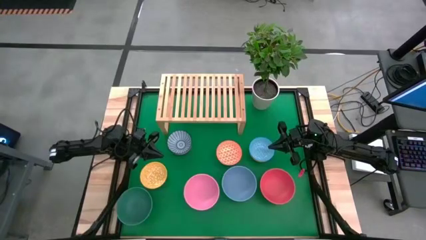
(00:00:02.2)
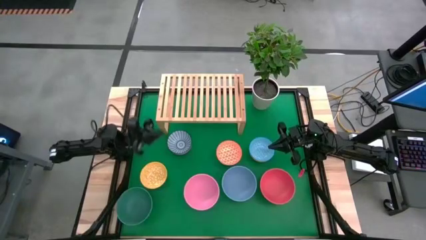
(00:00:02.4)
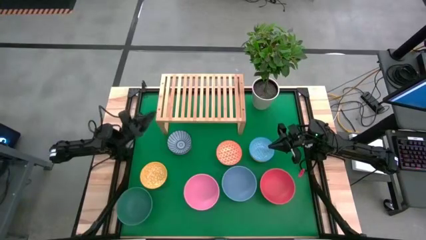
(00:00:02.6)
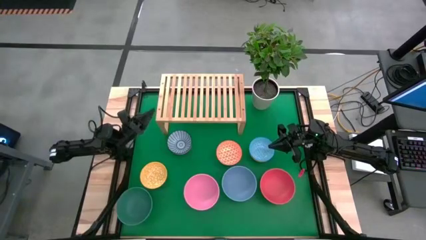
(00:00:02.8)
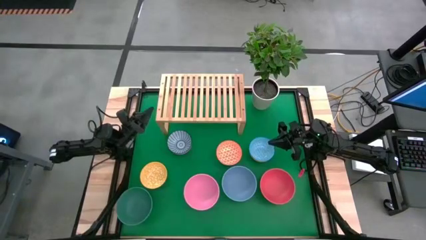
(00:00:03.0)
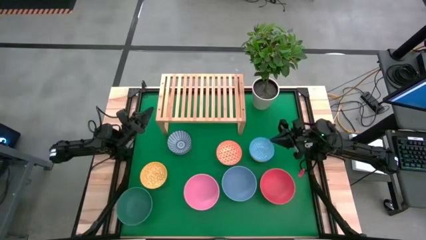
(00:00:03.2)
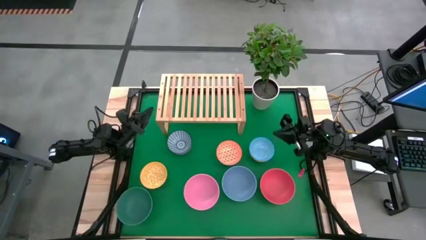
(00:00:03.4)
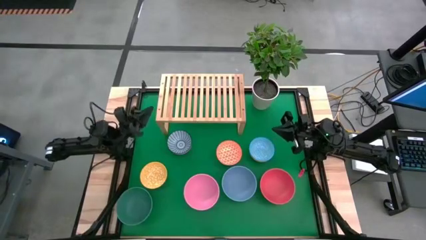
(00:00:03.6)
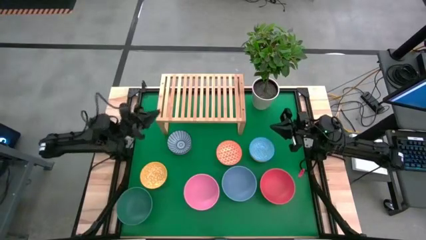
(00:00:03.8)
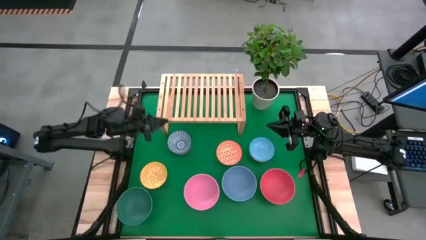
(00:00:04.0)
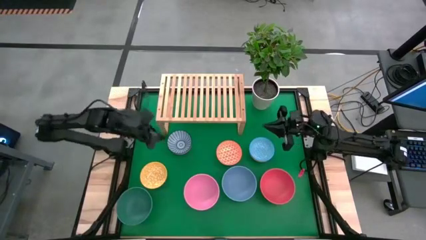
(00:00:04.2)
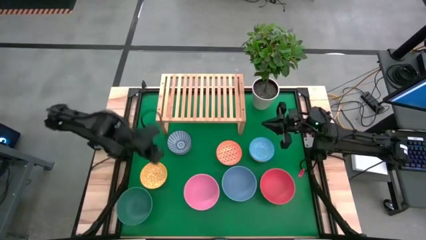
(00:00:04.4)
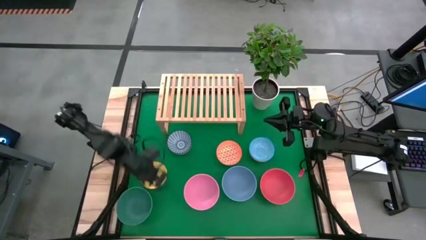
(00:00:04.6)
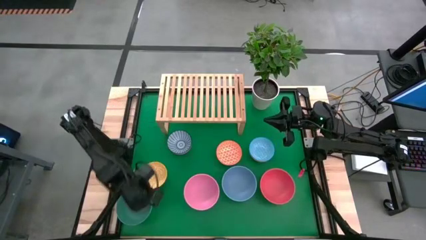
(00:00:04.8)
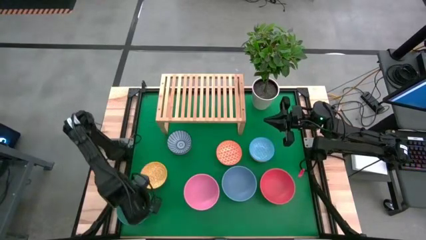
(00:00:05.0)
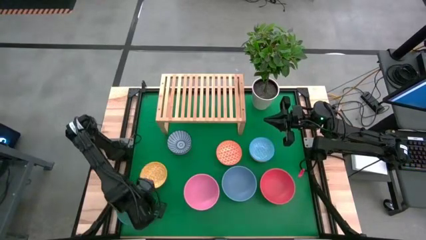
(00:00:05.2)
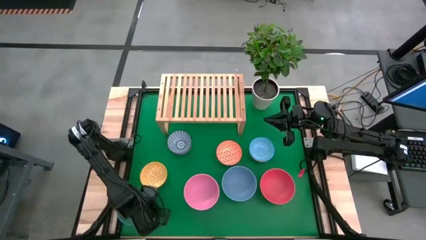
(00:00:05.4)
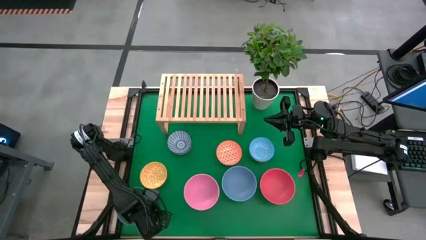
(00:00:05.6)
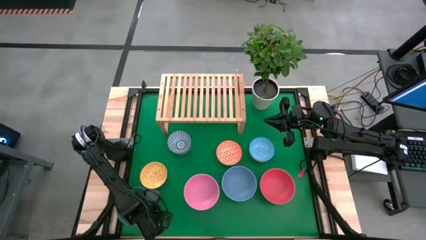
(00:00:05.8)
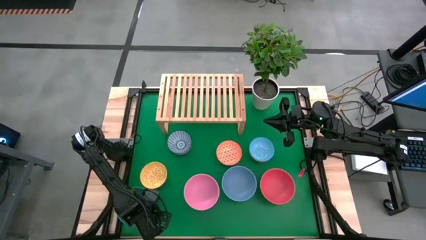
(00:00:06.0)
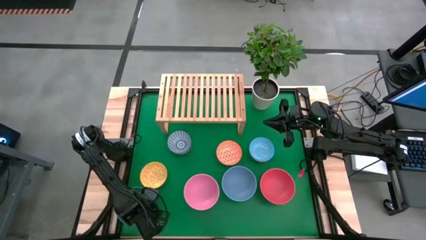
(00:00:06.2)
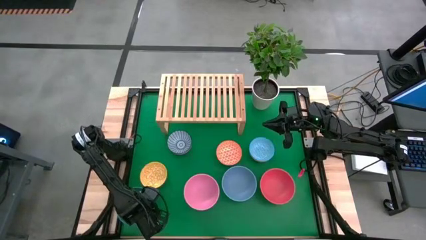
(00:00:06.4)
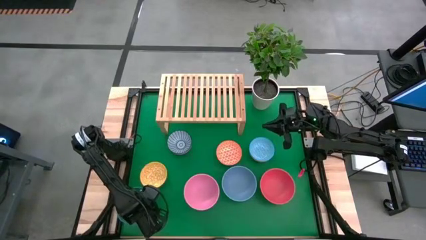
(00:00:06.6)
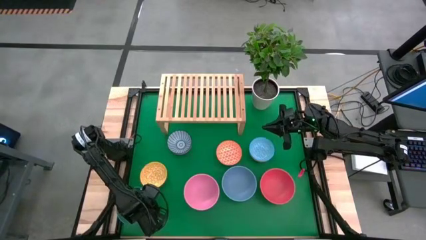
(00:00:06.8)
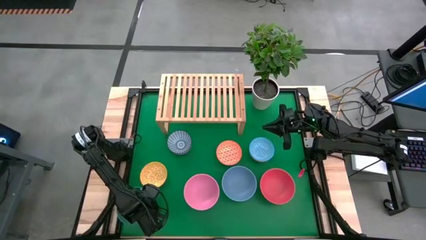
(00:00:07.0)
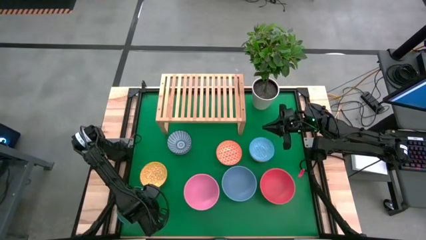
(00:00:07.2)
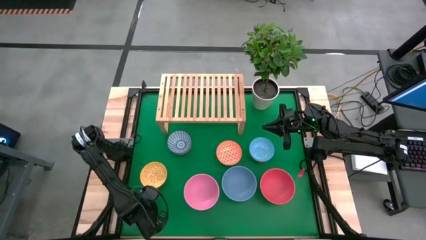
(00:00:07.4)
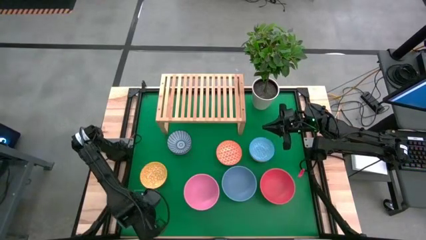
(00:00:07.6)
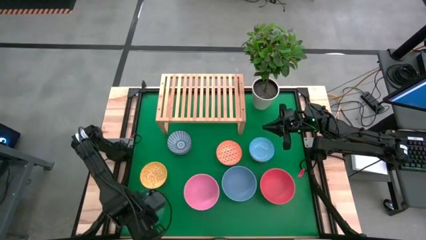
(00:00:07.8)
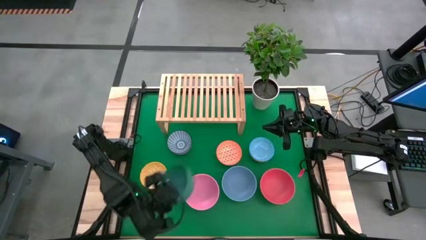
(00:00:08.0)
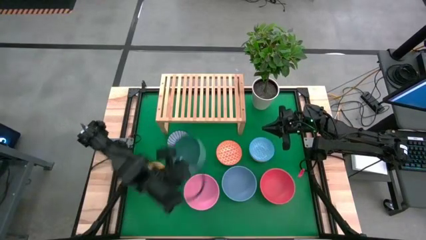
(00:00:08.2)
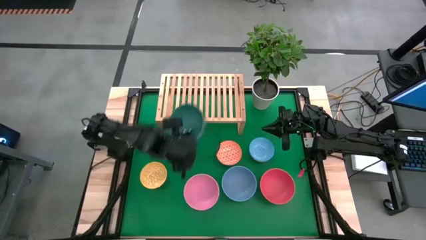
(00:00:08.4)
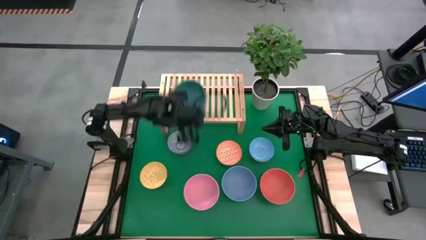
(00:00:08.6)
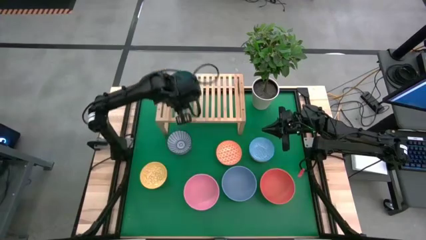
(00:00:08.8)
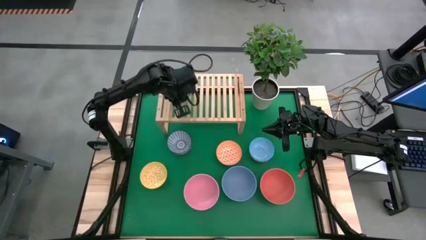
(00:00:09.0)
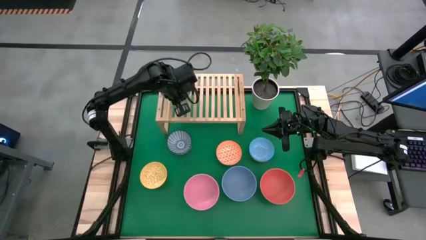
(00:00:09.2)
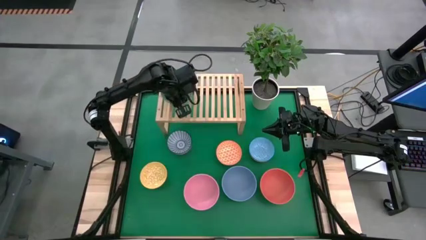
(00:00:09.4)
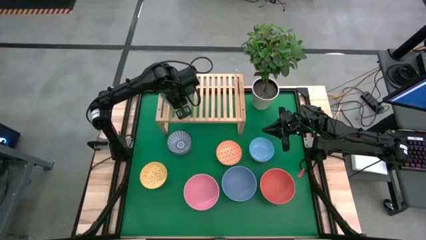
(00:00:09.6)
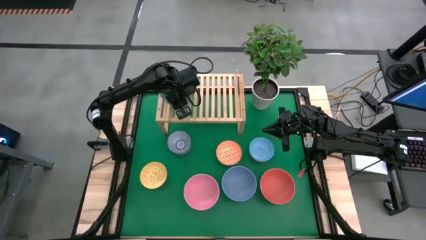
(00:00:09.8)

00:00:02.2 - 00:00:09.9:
Task: Place and stack bowls onto a shelf
Put the large green bowl on the shelf

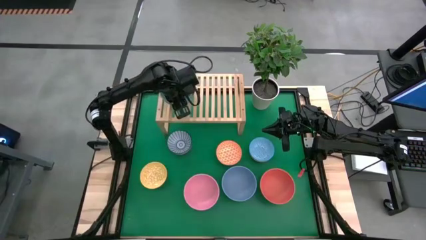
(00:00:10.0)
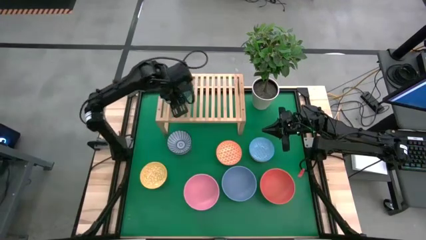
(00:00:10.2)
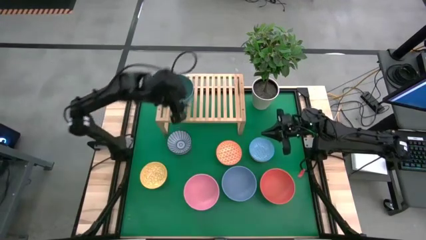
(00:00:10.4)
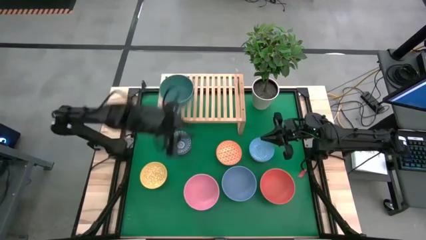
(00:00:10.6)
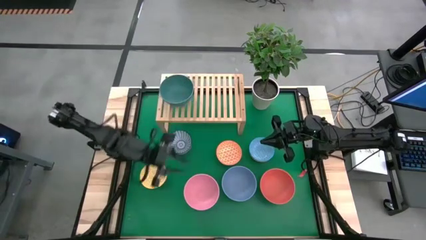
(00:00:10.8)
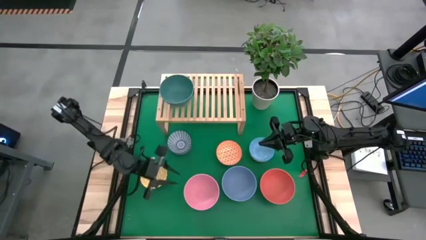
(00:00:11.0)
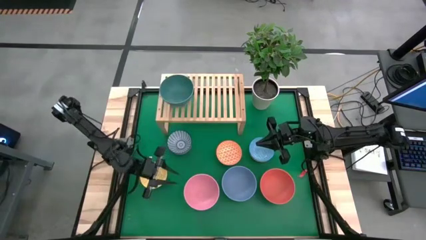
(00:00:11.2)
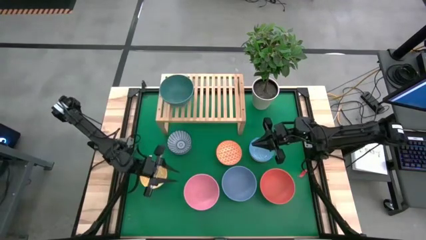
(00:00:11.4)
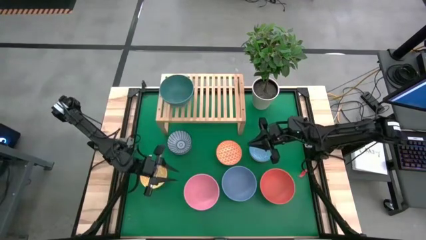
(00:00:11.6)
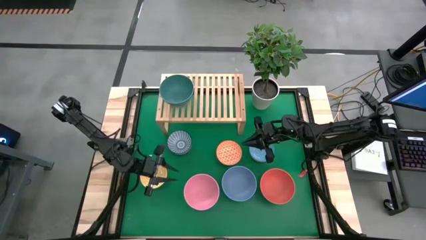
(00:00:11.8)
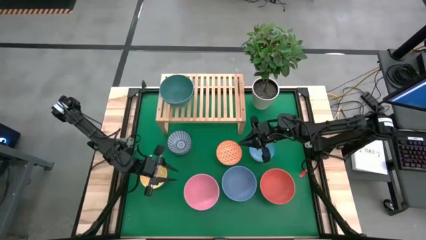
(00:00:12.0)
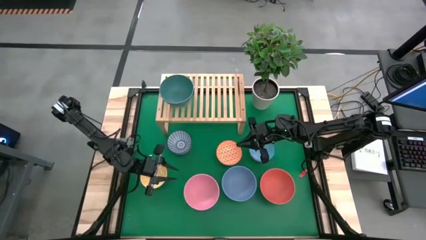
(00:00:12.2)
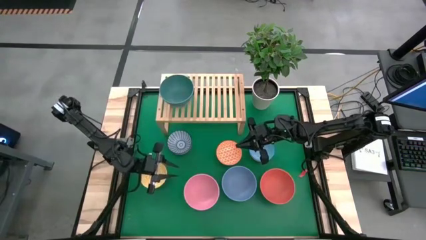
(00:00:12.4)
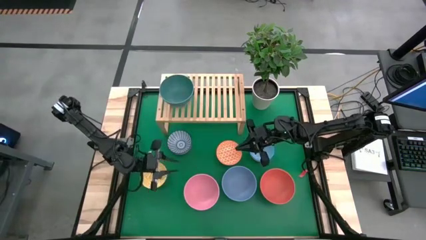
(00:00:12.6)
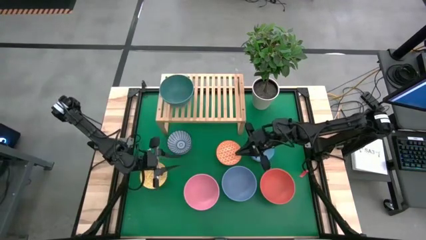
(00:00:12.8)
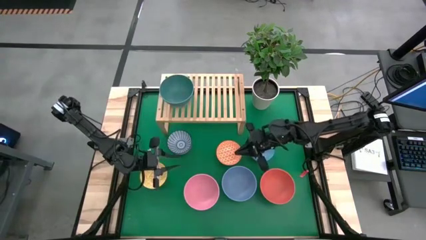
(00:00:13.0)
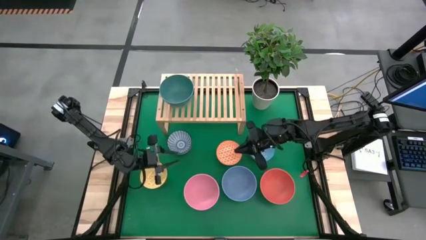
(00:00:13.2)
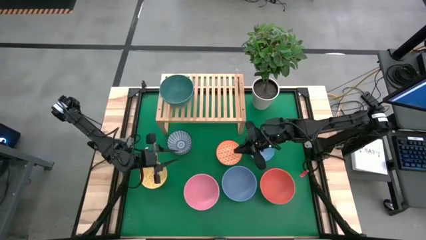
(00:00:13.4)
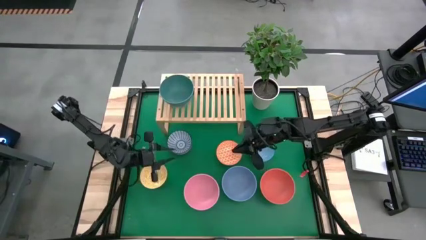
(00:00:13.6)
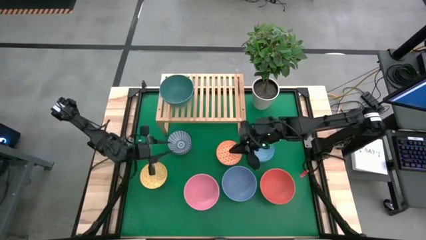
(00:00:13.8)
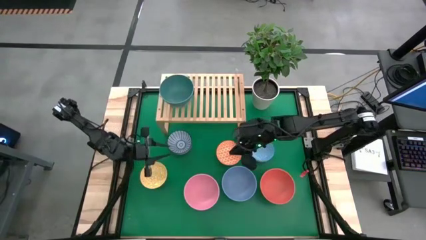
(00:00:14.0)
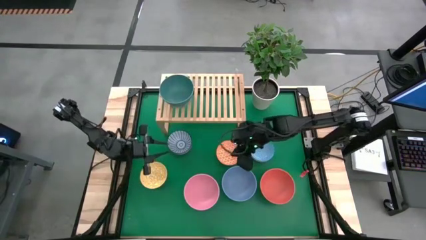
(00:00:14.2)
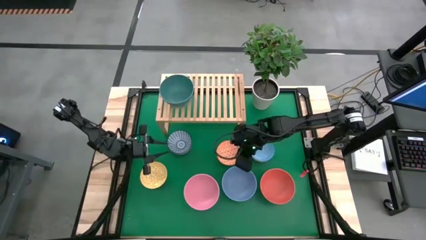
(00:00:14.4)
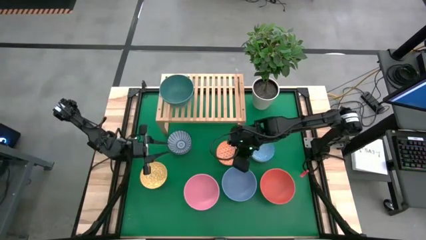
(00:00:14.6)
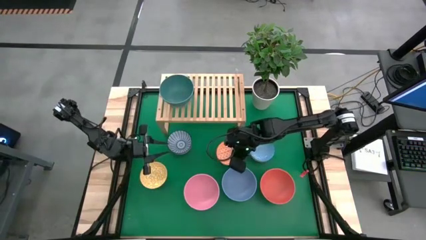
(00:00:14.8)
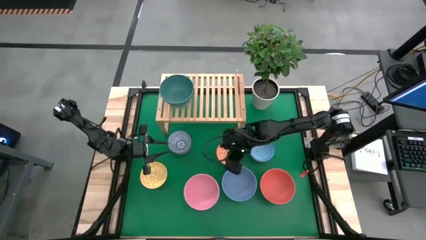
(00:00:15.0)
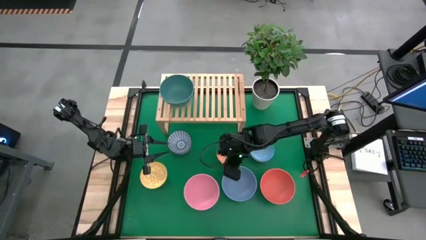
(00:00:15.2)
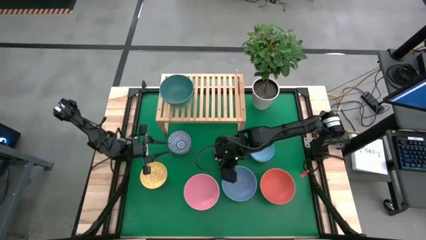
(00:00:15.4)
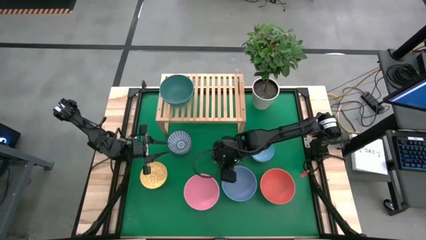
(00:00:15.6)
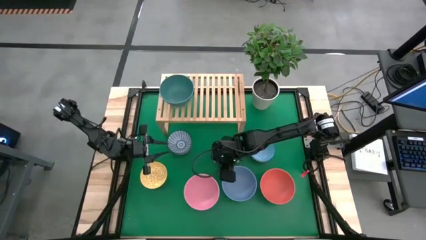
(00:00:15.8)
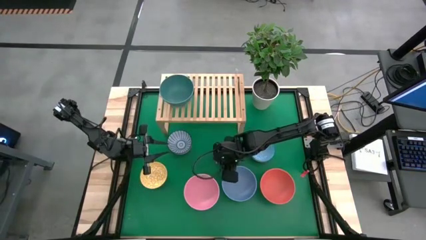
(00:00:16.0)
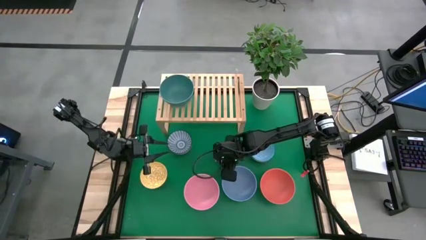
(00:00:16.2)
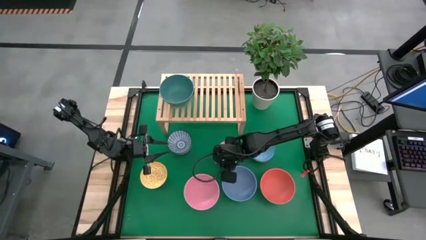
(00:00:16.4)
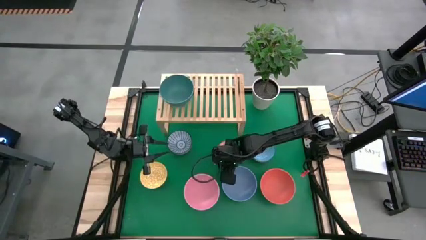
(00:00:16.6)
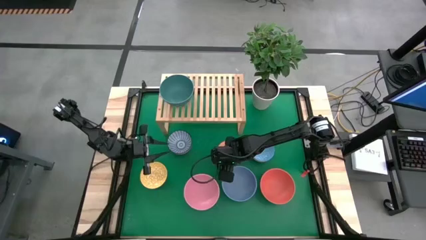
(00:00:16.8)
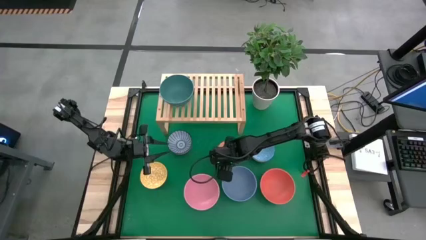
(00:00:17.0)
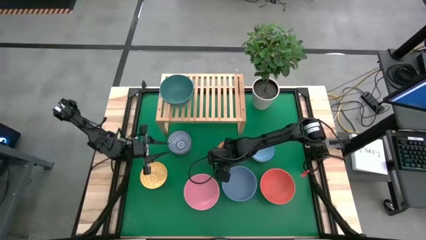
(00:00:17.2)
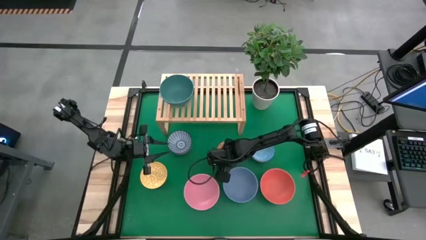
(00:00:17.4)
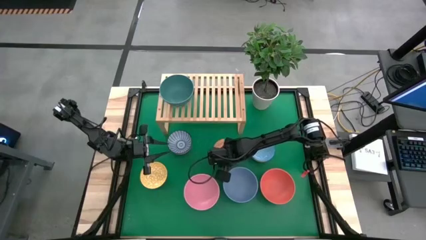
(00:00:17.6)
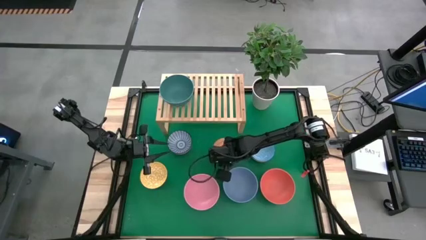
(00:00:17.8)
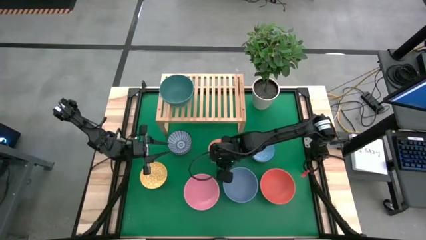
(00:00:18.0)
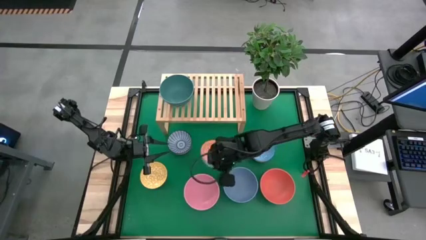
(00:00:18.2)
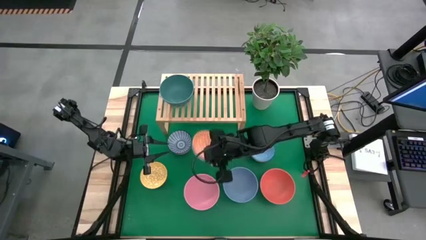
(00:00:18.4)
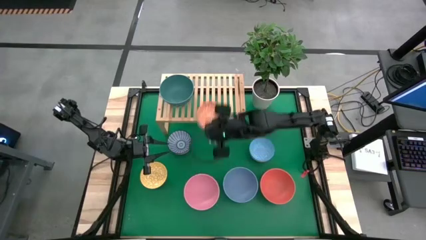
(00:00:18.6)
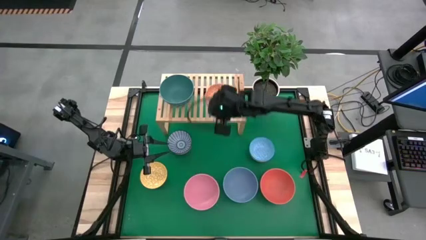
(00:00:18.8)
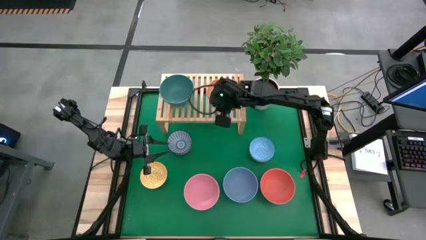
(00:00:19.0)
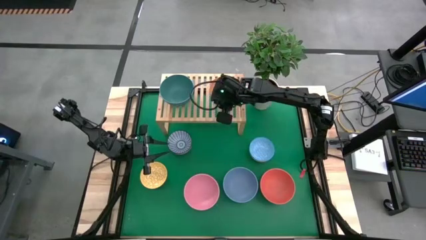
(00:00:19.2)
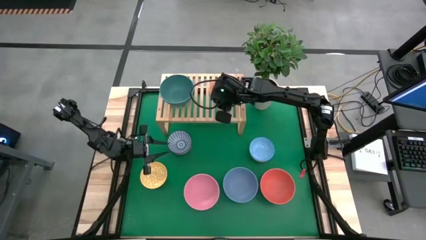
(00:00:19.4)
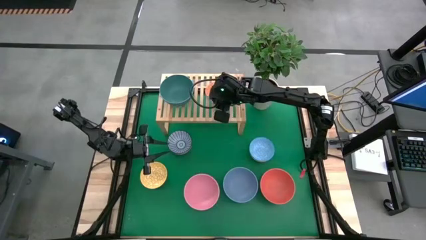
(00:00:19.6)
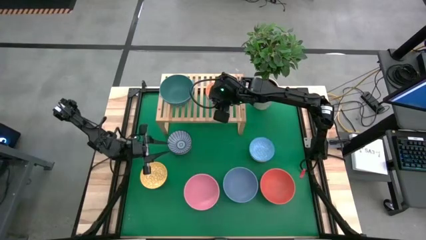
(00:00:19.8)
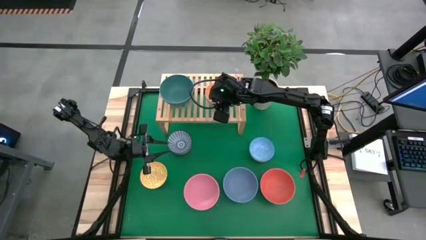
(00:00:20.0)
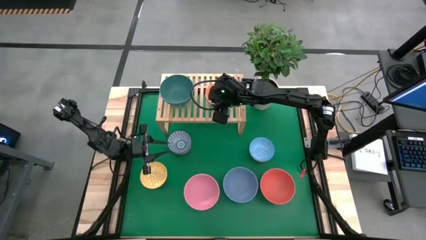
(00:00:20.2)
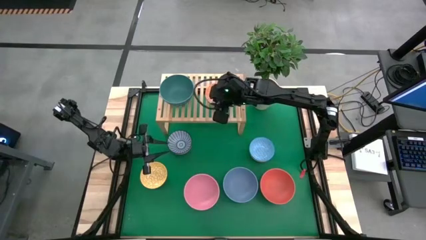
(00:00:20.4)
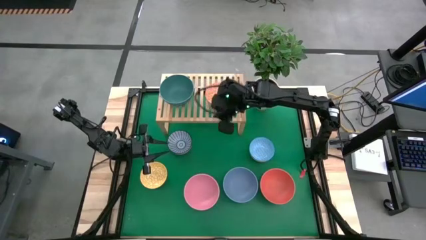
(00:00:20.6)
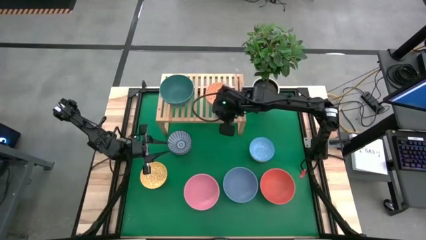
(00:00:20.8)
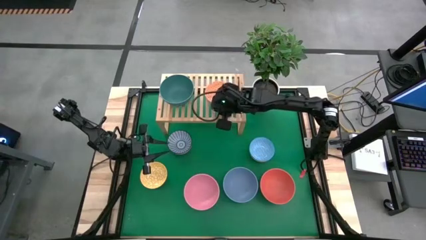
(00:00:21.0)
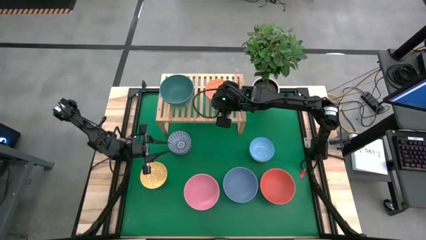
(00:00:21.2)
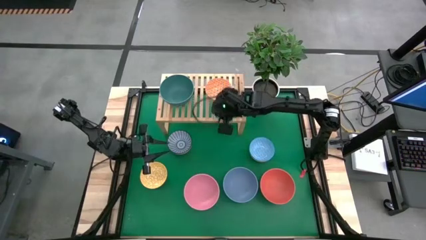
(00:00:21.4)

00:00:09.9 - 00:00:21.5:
Put the small orange bowl on the shelf
